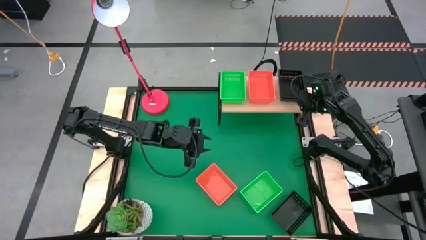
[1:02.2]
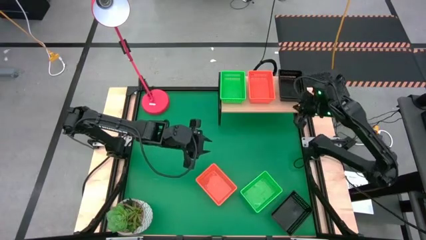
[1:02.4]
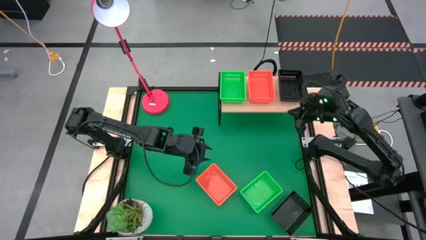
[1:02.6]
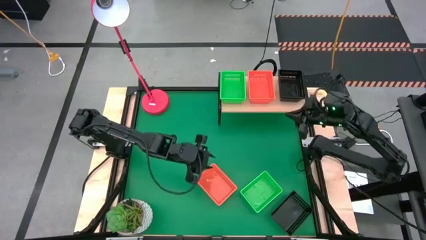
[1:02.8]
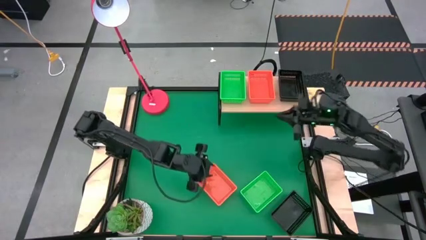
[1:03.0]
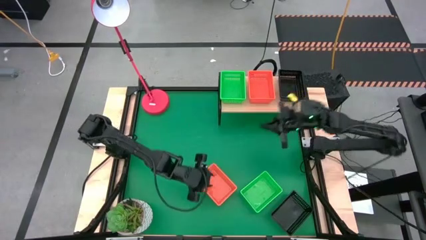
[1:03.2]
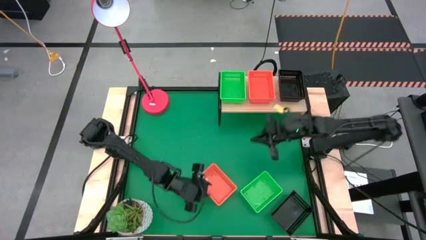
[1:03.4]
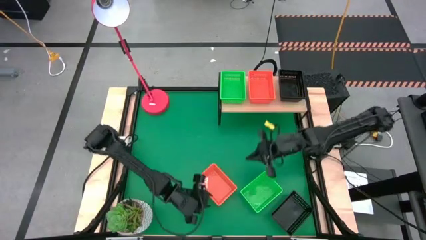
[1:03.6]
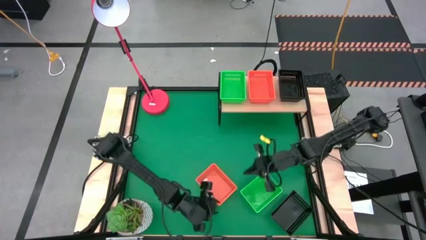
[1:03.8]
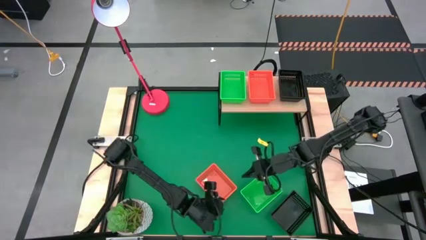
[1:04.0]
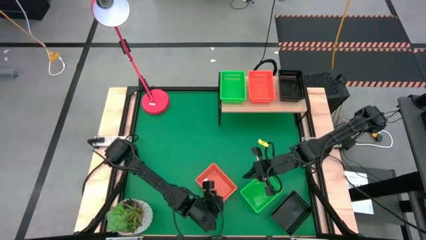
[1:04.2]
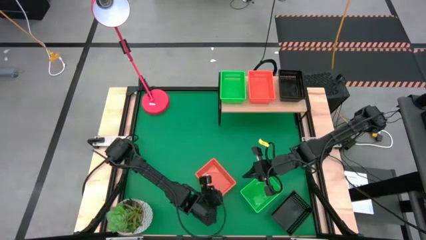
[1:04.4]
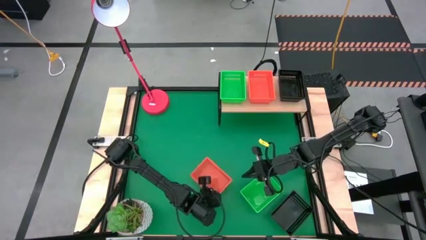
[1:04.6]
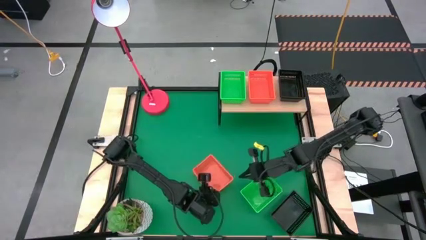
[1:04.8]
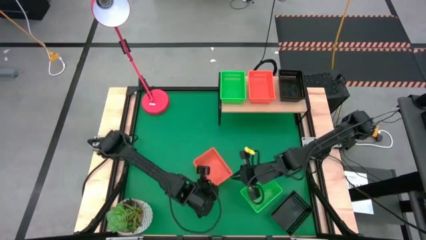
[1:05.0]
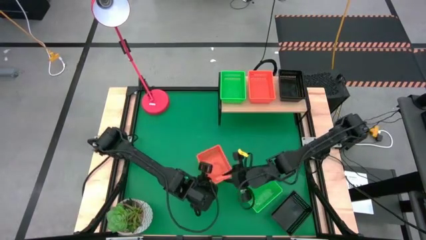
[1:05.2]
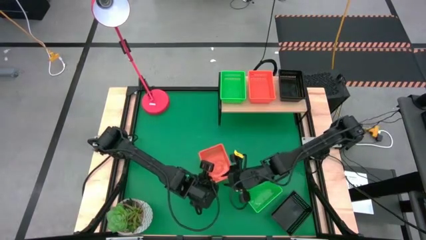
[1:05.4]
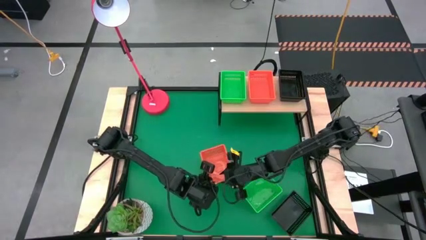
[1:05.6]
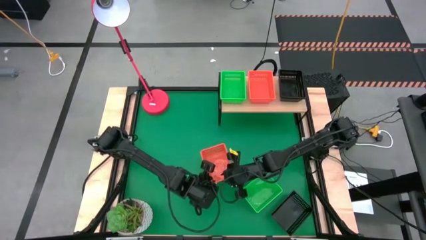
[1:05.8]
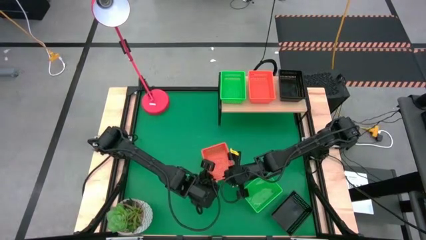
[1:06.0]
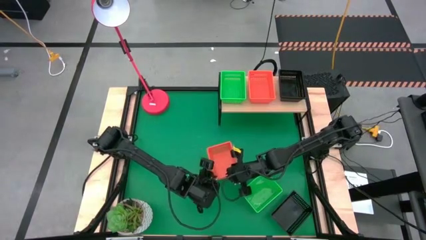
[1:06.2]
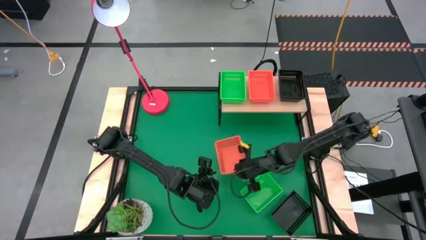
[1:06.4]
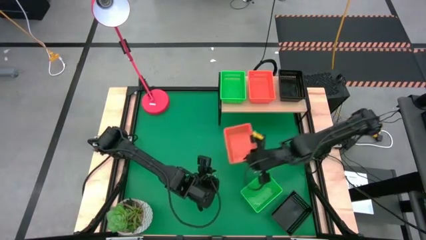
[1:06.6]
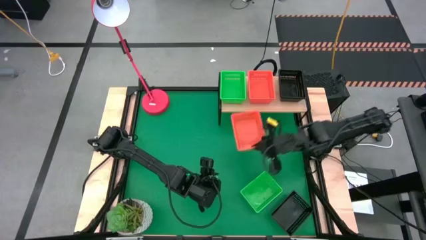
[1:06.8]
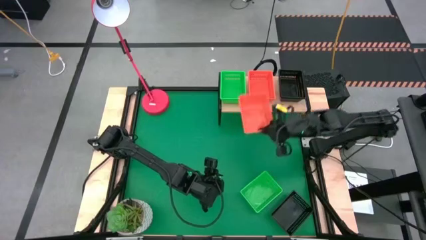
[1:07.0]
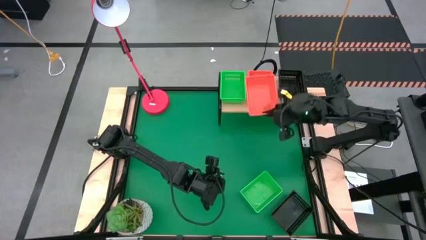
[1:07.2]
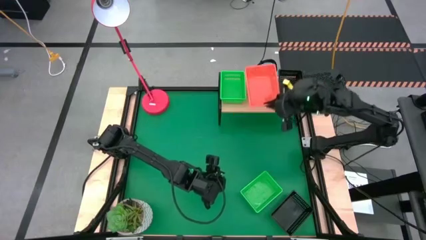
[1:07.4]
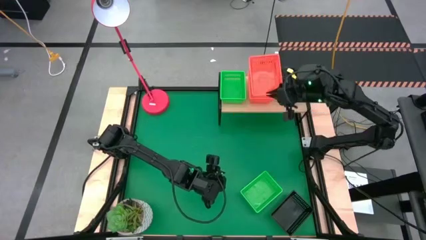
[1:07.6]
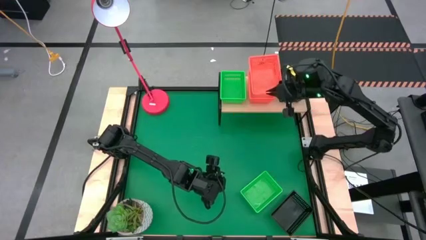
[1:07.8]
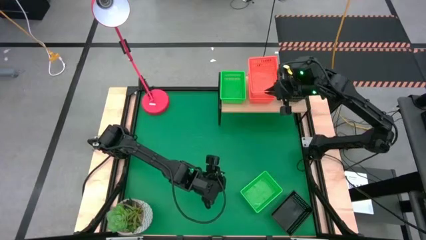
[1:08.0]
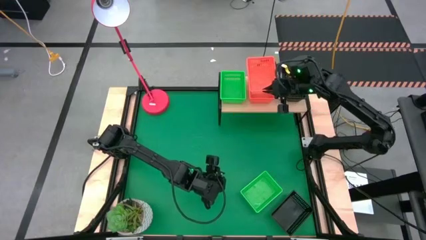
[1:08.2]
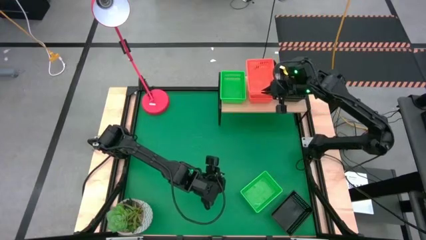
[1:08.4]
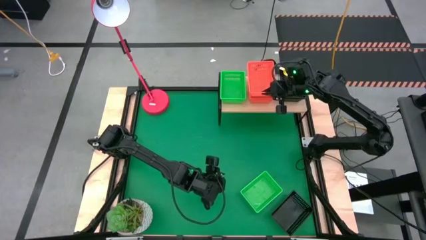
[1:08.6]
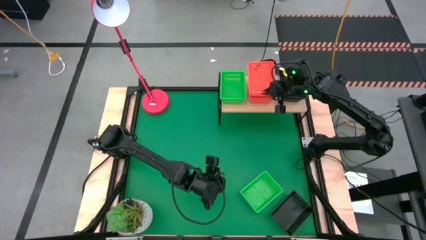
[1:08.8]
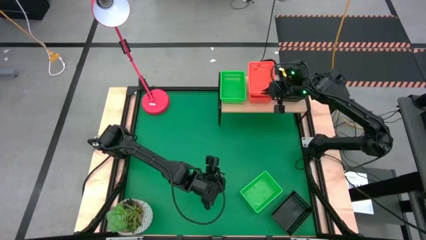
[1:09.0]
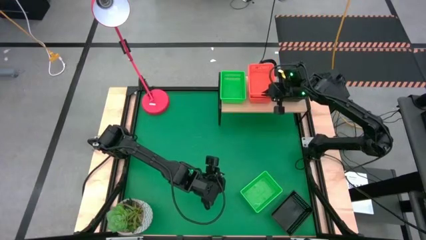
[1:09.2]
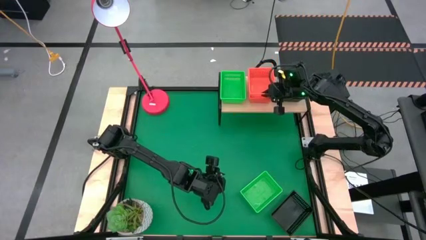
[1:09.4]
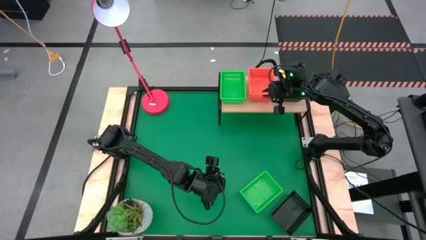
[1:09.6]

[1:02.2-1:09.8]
Task: Stack baskets on shelf by color
Stack the orange basket on top of the orange baskets on the shelf

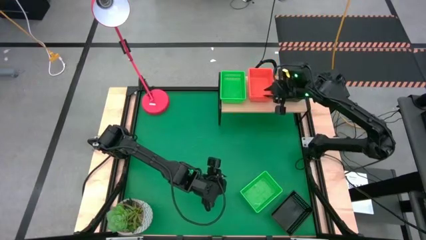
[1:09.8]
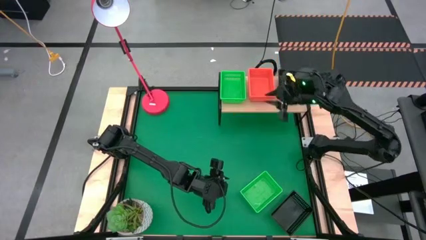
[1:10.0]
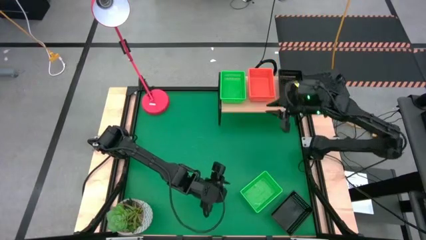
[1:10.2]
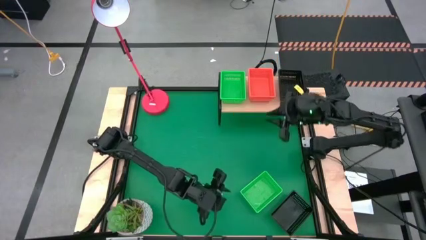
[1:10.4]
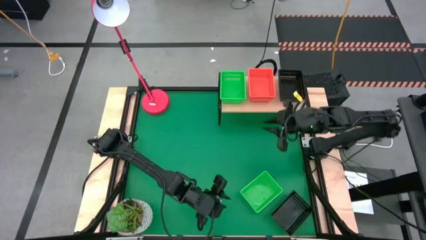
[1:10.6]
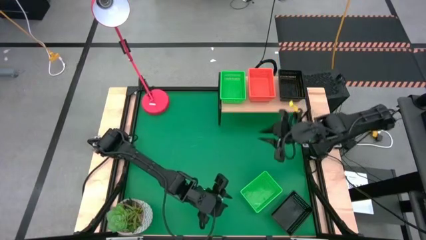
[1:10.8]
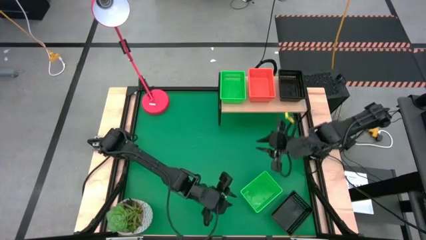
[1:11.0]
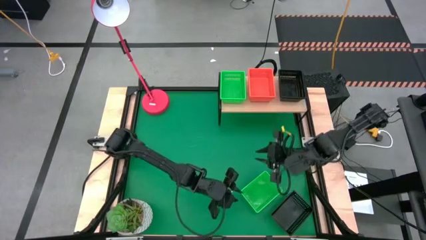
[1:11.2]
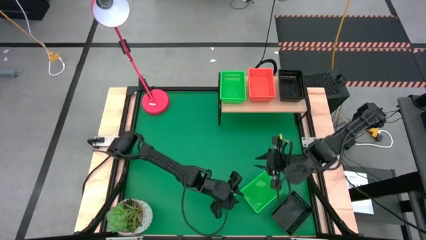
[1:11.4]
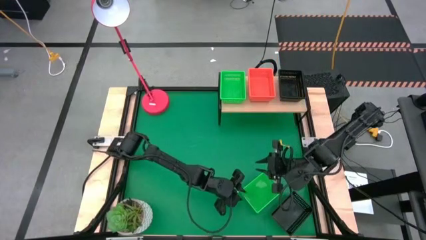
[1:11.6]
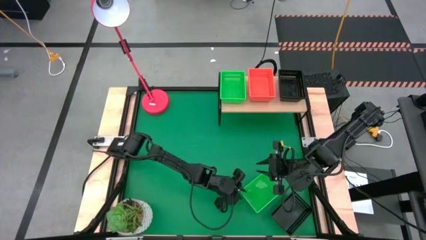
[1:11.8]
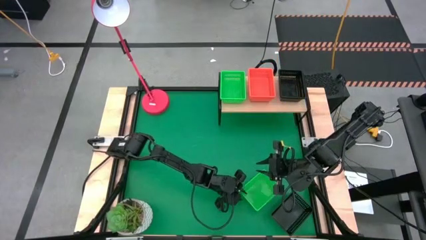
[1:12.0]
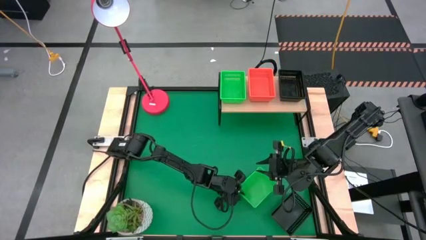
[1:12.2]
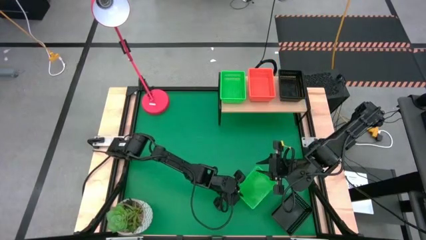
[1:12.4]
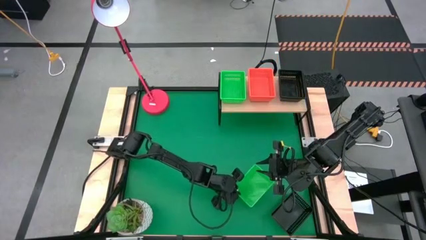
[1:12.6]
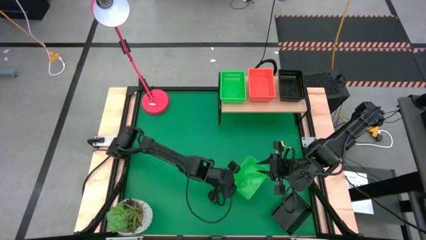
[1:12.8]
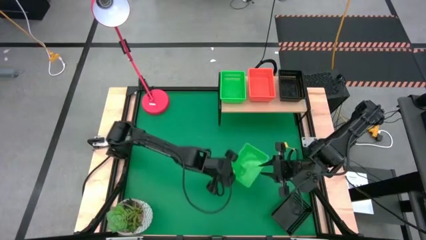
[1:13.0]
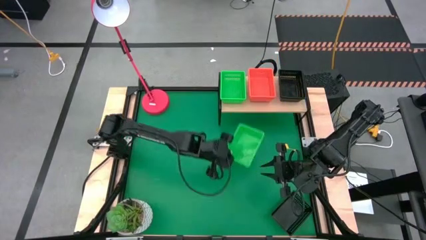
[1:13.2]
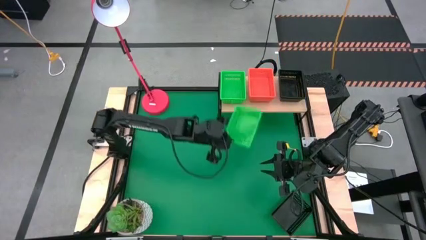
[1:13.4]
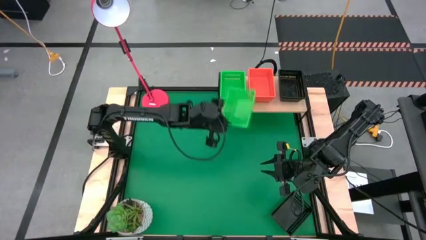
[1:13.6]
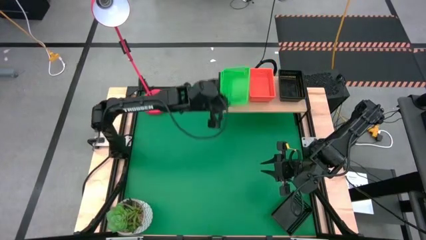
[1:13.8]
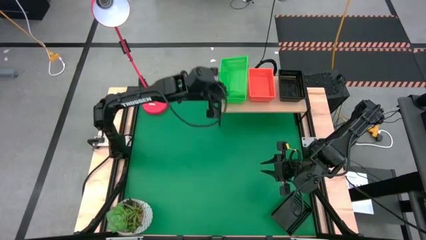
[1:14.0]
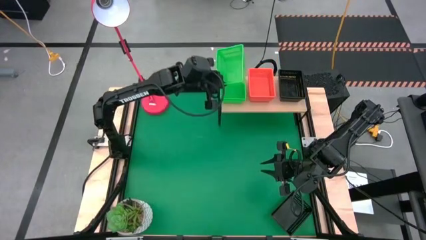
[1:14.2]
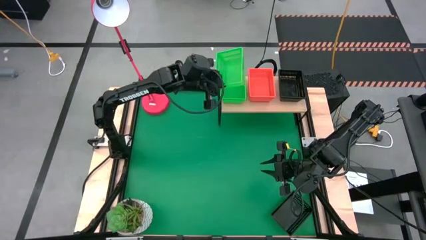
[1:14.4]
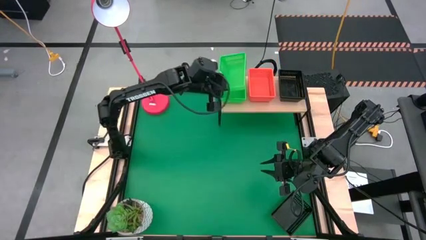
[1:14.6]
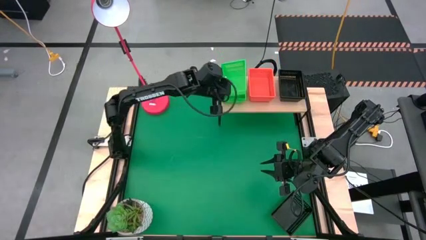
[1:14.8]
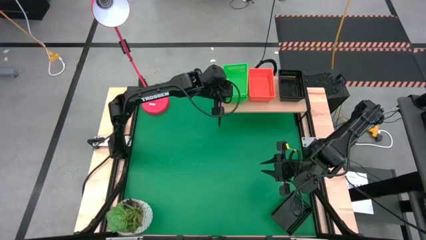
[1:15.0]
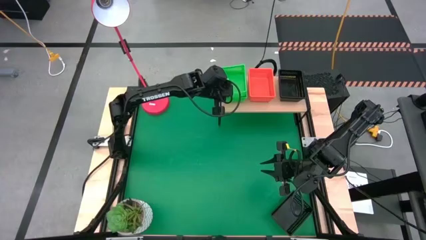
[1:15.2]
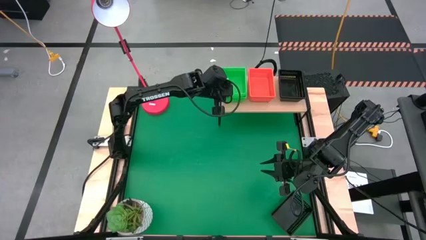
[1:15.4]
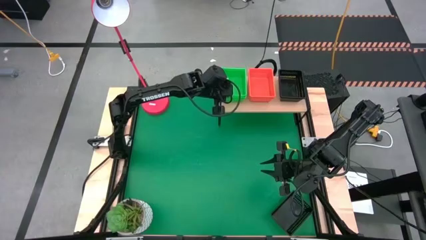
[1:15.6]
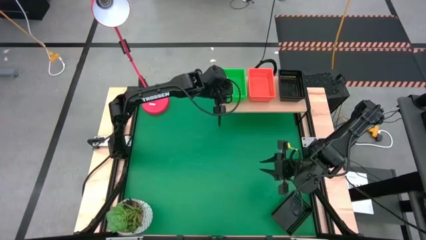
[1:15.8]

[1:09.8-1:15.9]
Stack the green basket on top of the green baskets on the shelf
